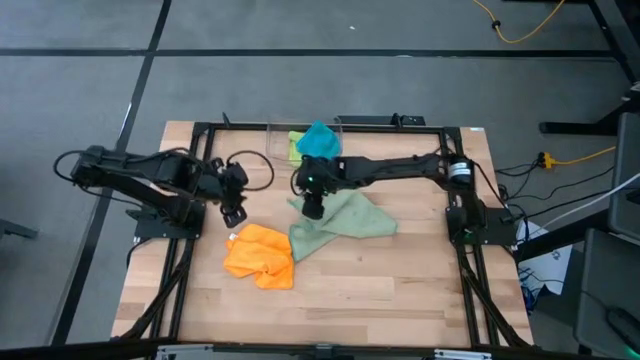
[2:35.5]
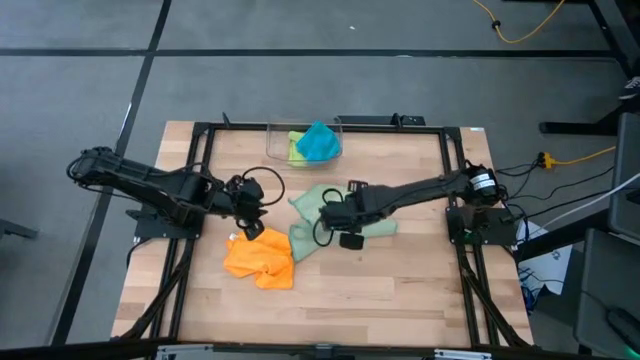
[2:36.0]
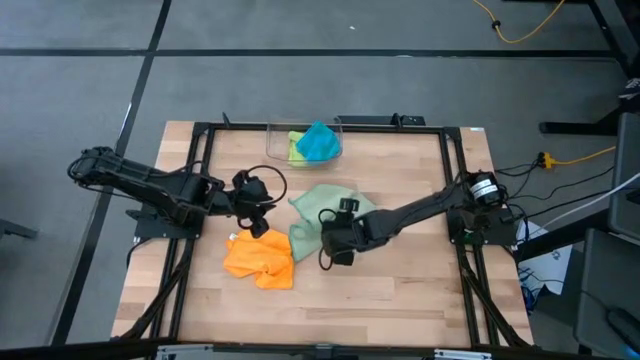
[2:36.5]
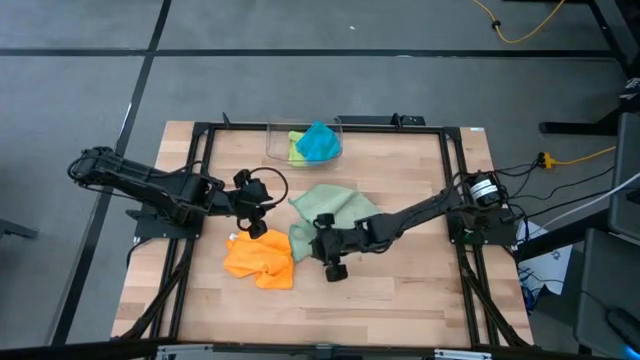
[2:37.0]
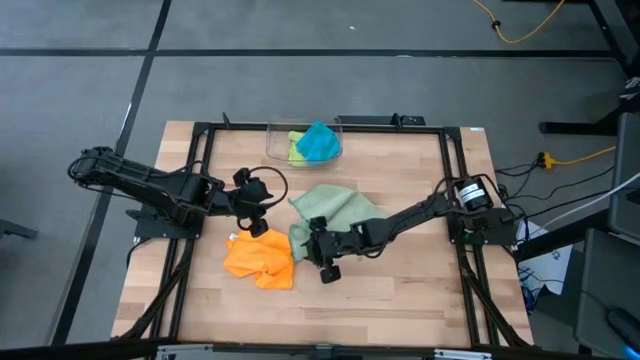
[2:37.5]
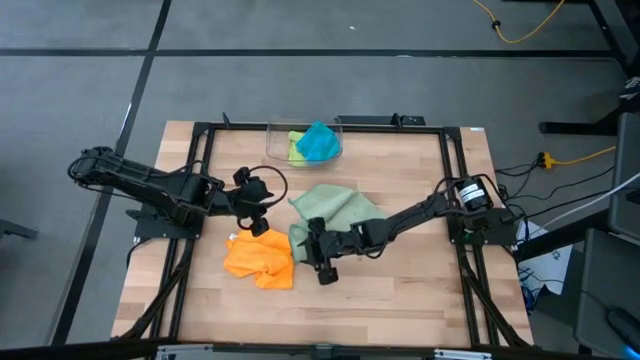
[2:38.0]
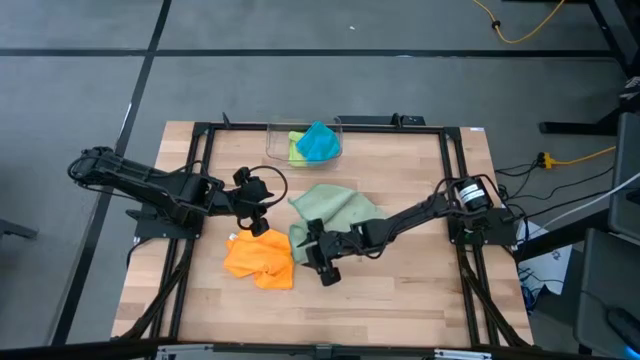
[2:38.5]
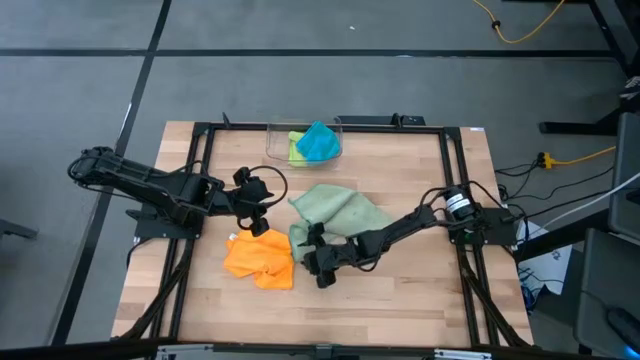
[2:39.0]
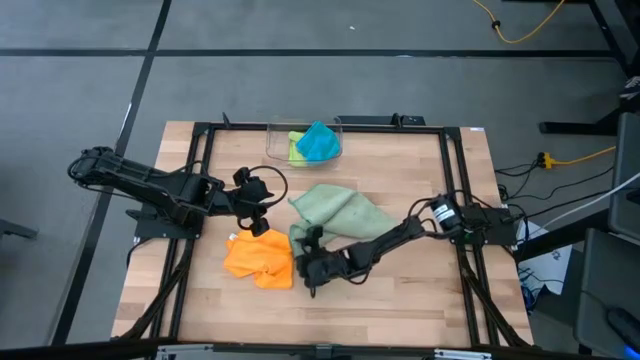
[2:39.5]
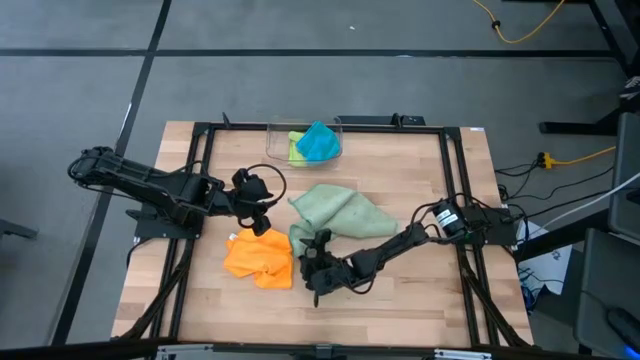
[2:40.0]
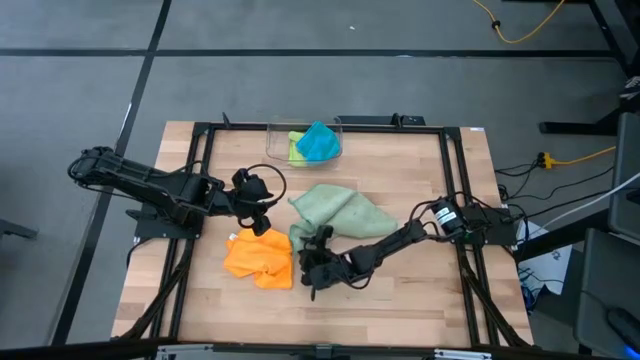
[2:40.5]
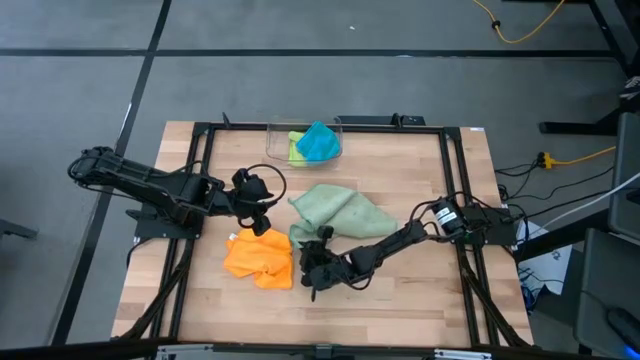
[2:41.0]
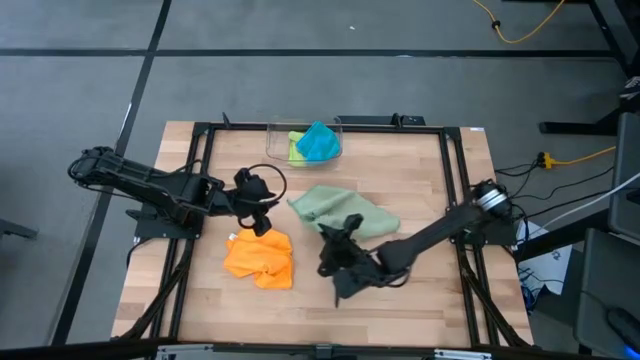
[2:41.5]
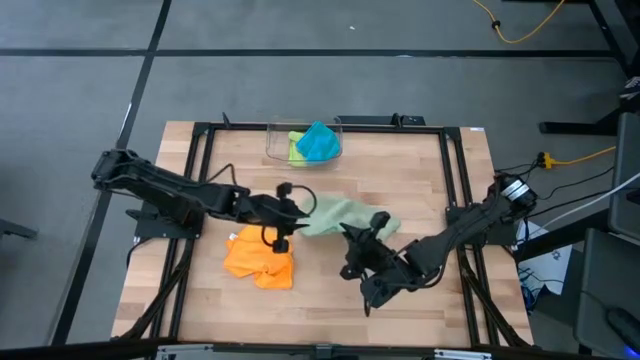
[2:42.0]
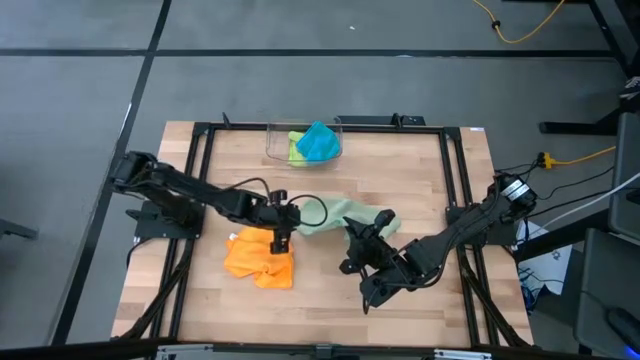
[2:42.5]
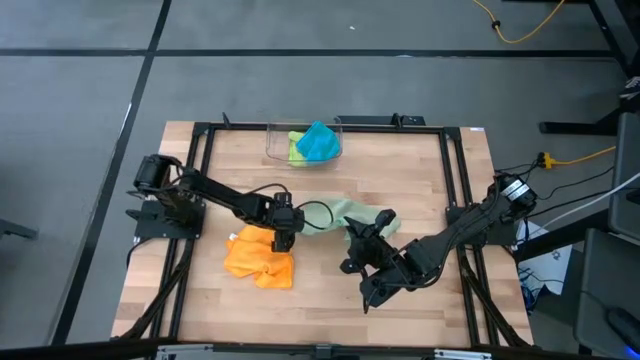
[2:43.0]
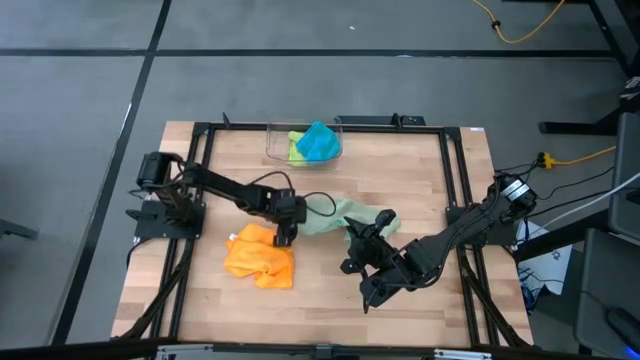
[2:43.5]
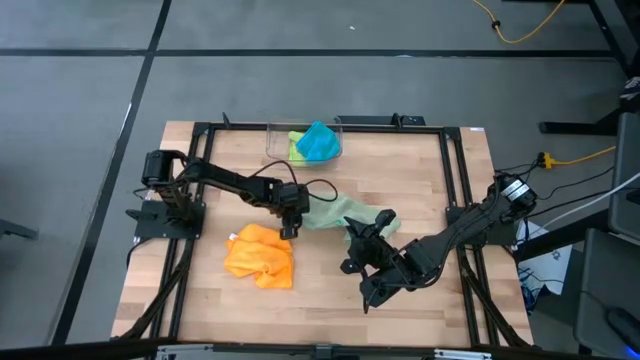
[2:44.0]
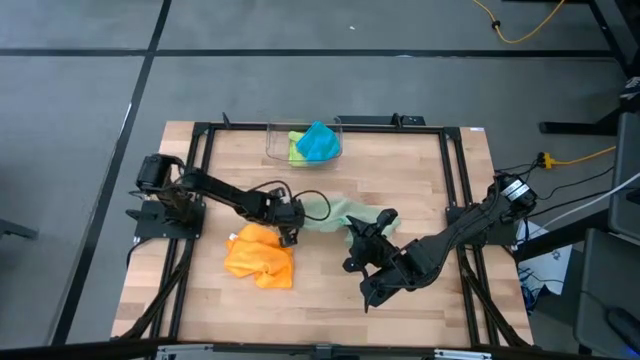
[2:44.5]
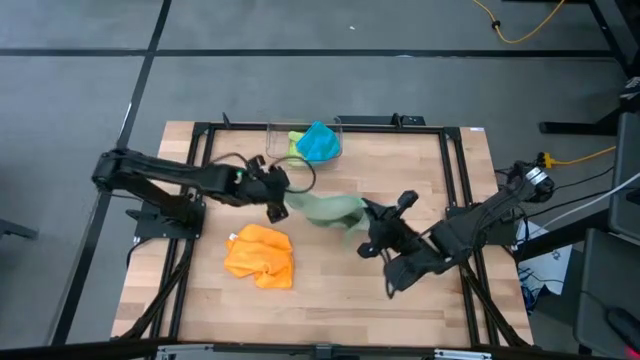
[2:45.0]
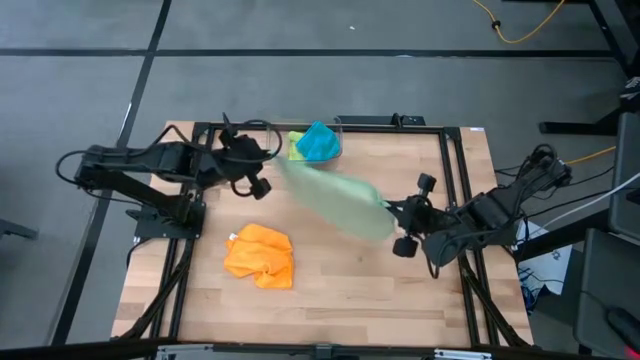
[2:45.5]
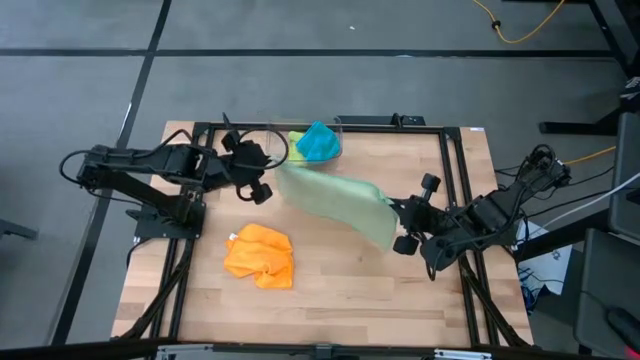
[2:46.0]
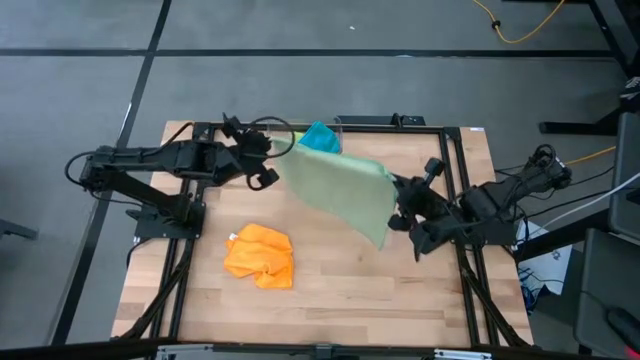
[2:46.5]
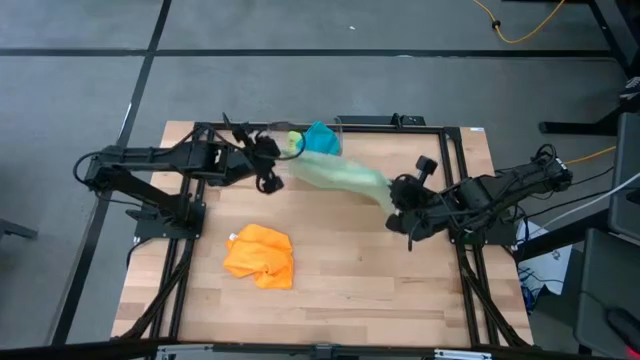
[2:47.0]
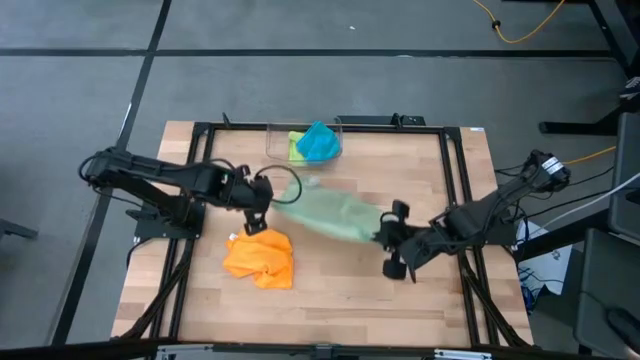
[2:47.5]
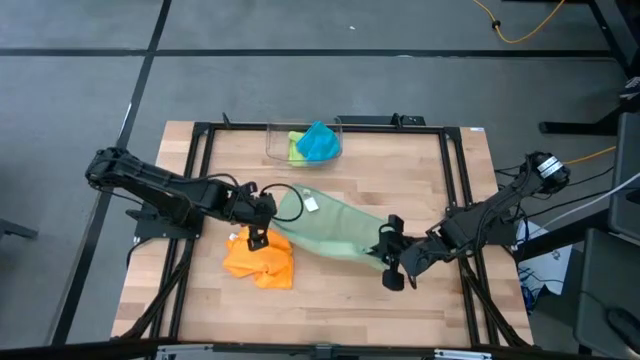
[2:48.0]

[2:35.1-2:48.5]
Task: Fold microfiber towels
Fold the green towel

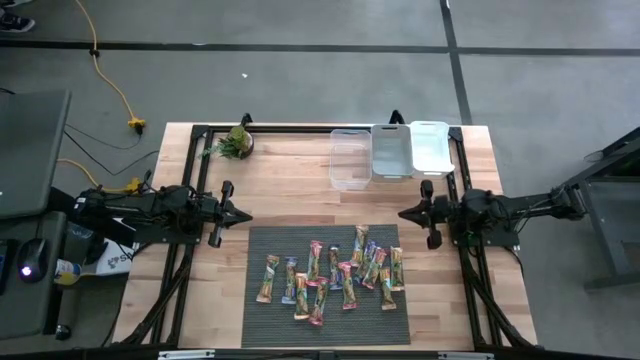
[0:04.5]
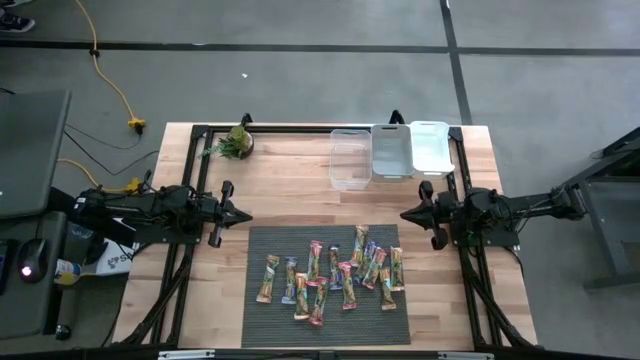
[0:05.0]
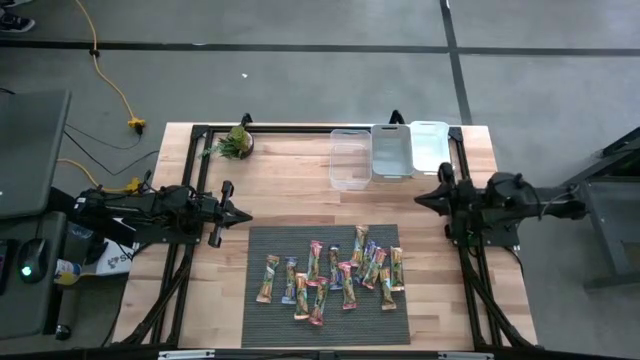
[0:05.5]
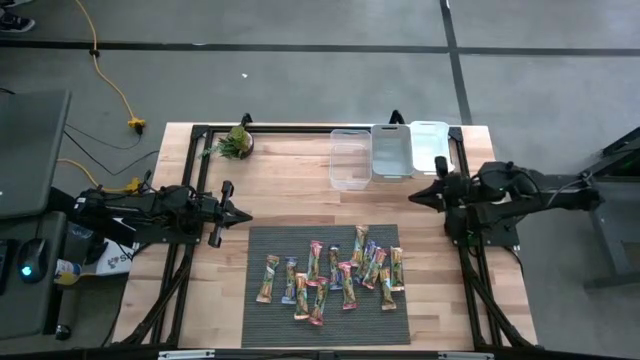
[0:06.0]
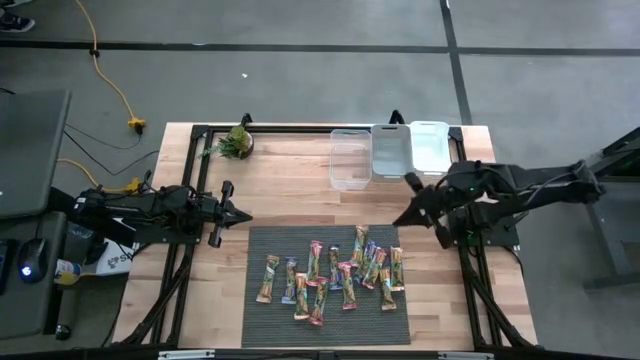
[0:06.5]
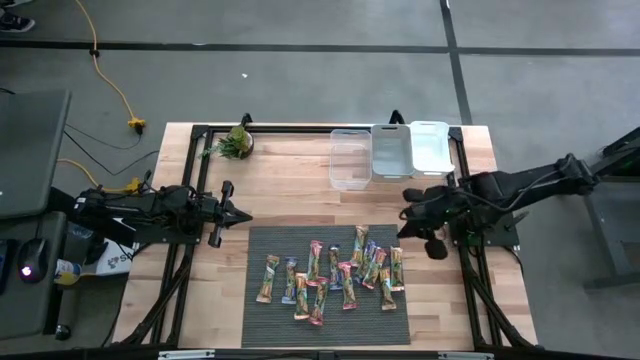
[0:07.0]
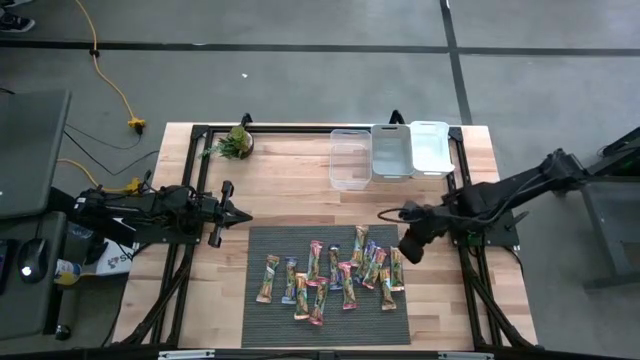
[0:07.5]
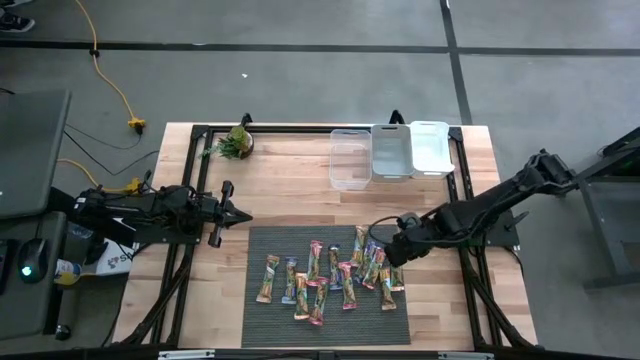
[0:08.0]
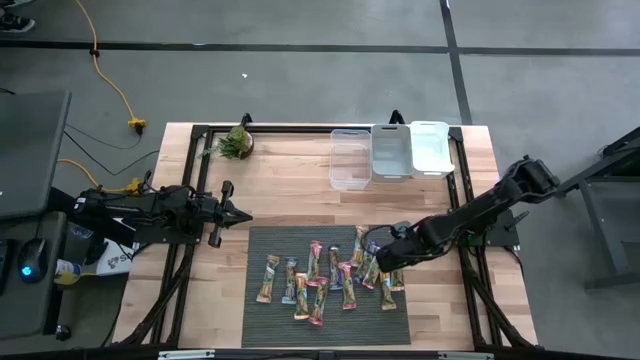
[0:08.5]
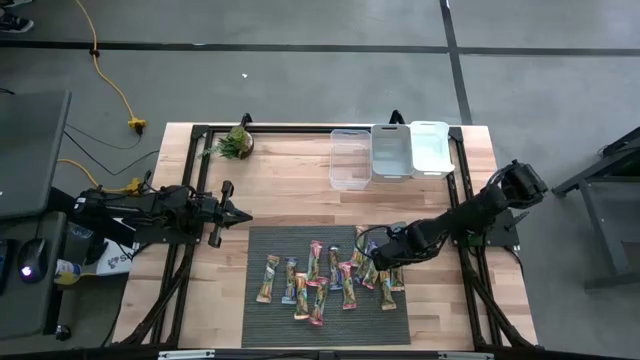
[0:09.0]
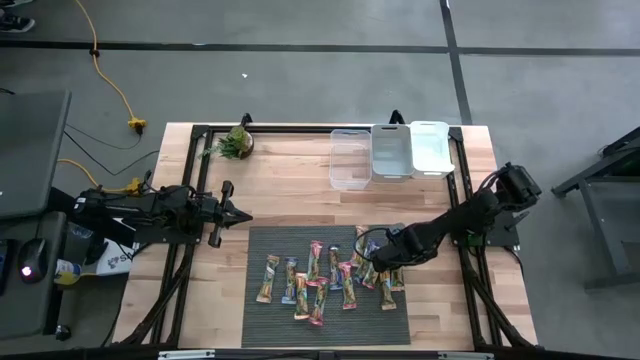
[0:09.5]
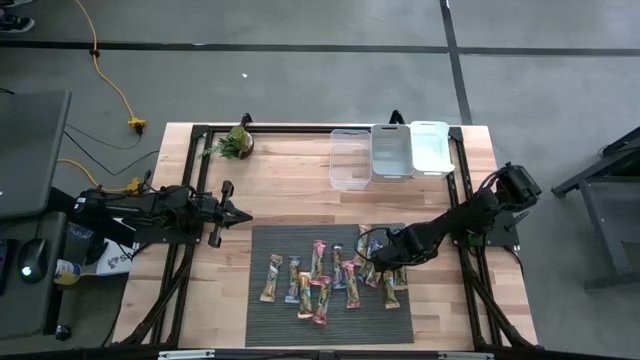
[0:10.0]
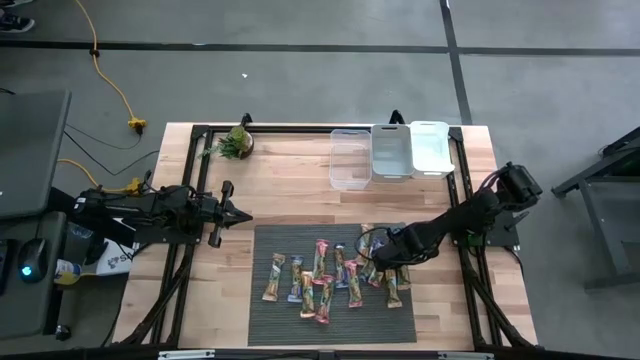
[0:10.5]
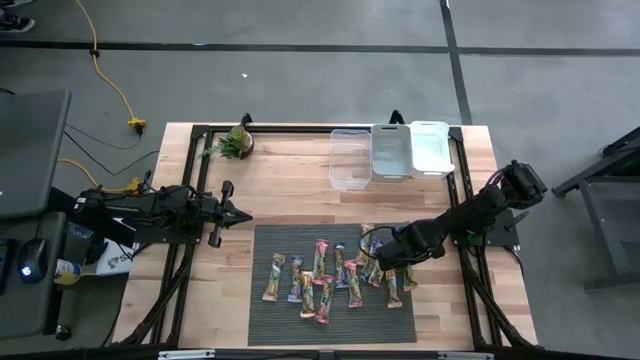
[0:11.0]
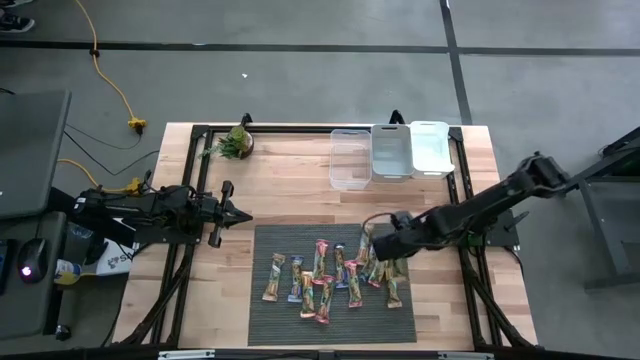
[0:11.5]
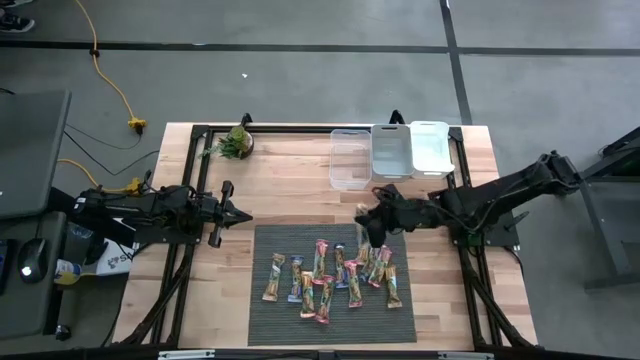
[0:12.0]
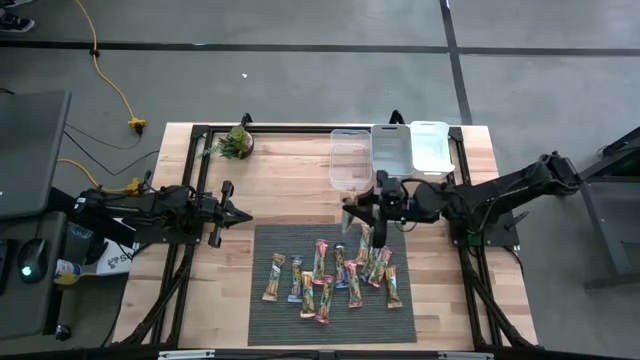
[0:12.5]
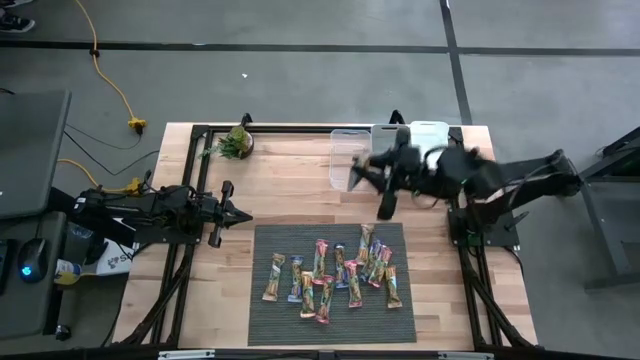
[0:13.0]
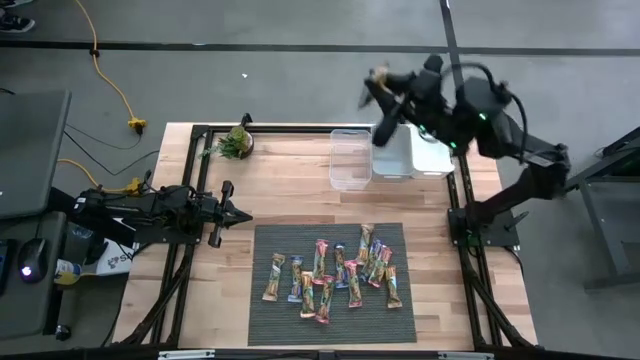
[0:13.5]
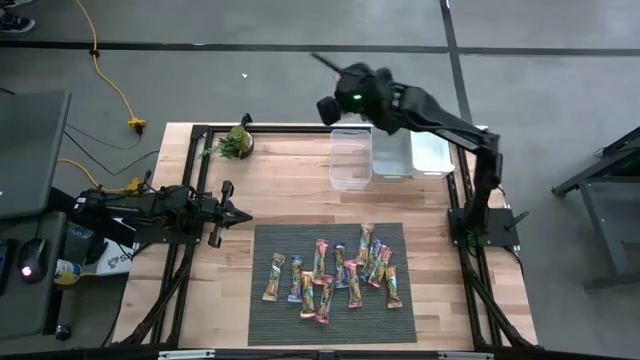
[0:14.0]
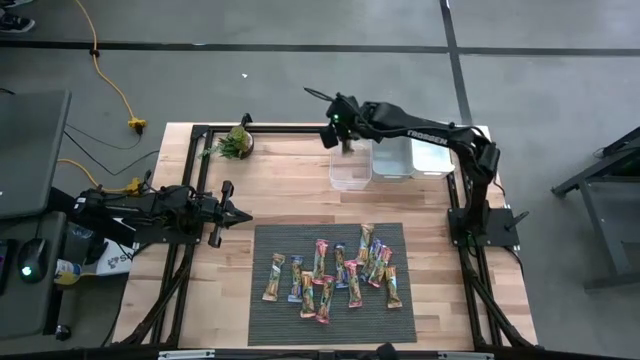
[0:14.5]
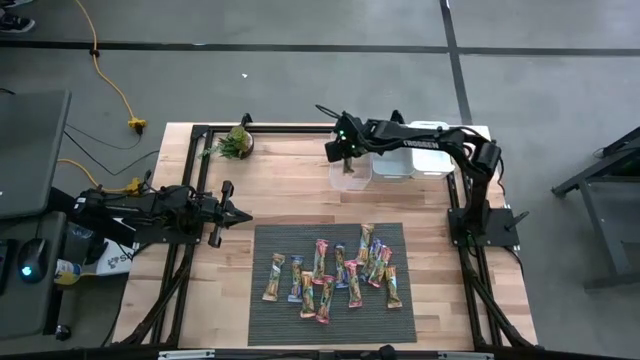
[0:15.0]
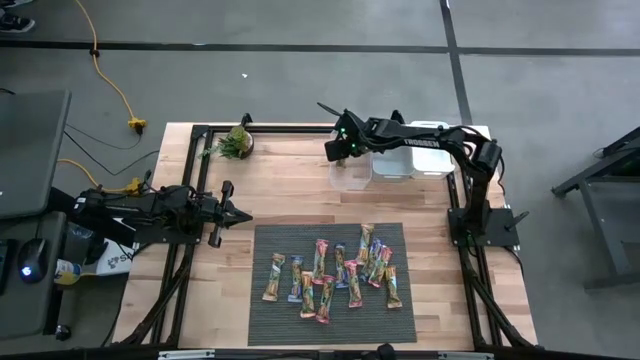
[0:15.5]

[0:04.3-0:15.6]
Task: Pick and place Granola Bars by type
Put the yellow granola bar into the transparent bin
